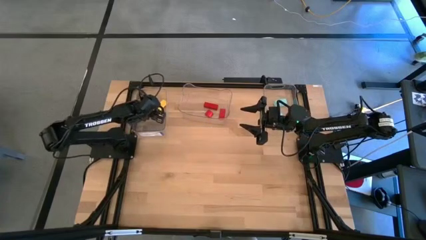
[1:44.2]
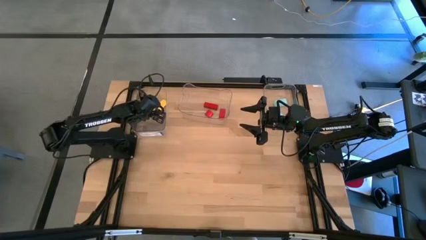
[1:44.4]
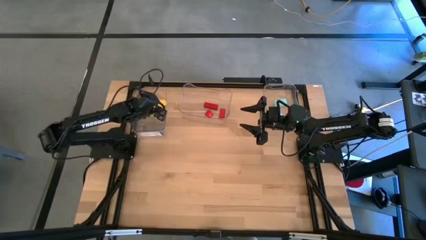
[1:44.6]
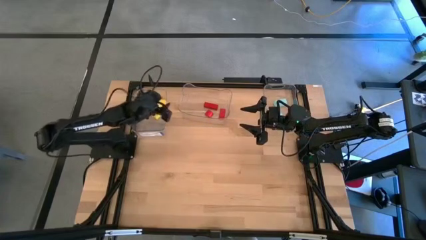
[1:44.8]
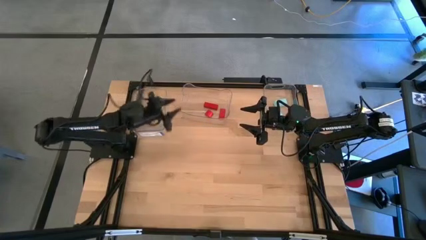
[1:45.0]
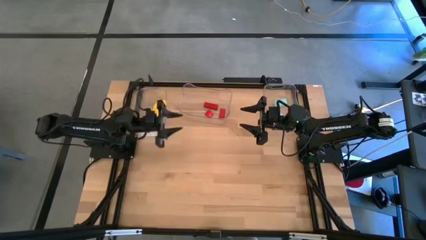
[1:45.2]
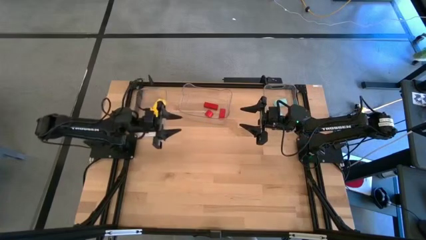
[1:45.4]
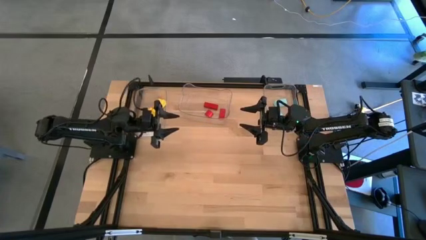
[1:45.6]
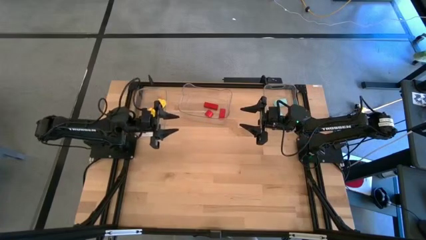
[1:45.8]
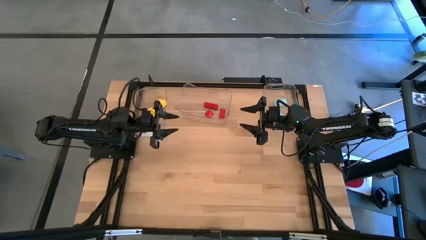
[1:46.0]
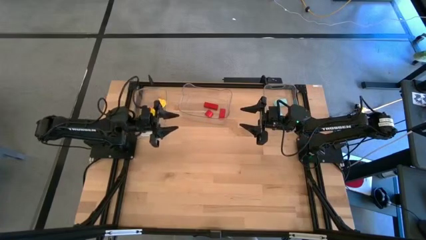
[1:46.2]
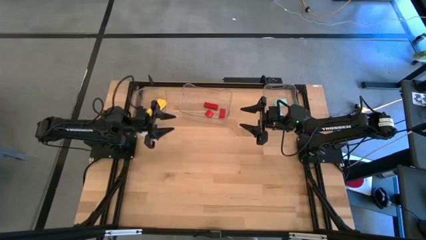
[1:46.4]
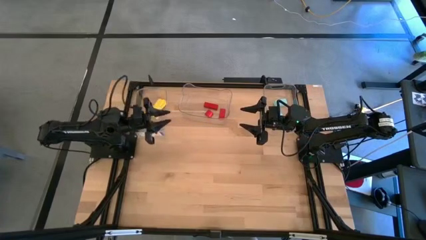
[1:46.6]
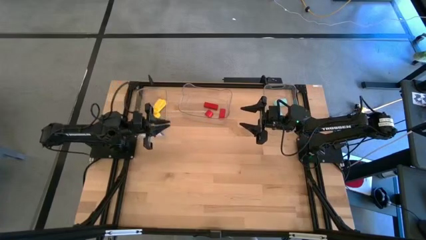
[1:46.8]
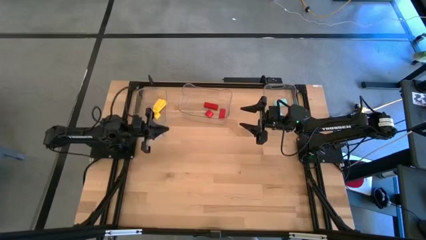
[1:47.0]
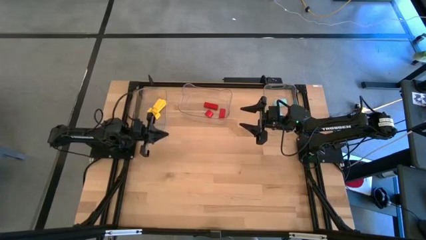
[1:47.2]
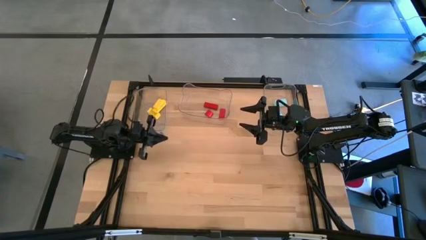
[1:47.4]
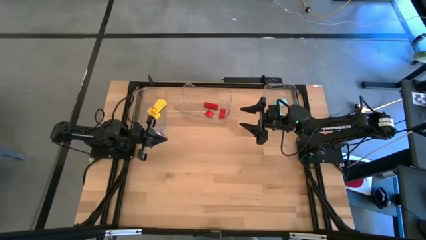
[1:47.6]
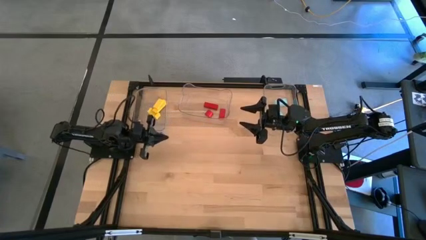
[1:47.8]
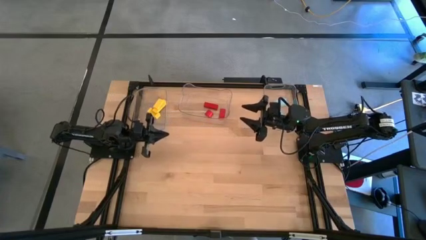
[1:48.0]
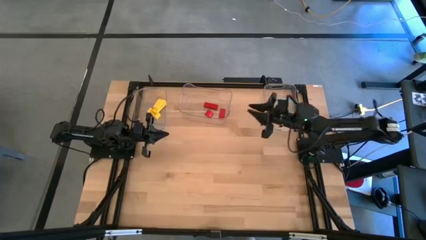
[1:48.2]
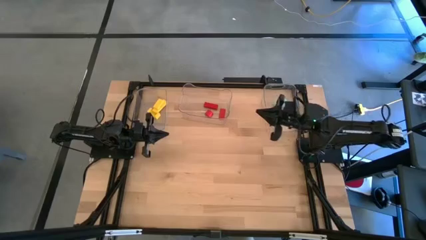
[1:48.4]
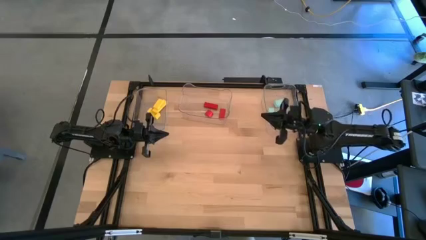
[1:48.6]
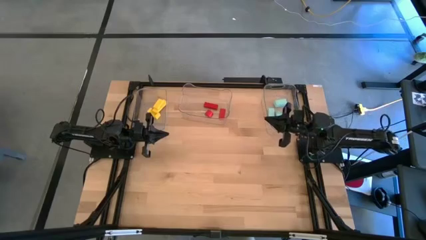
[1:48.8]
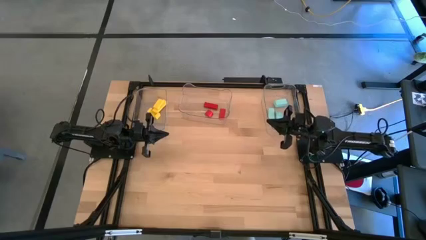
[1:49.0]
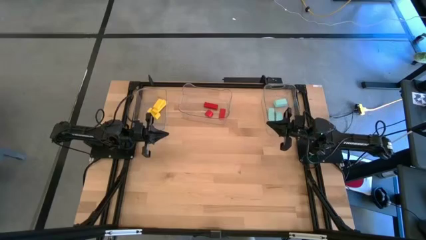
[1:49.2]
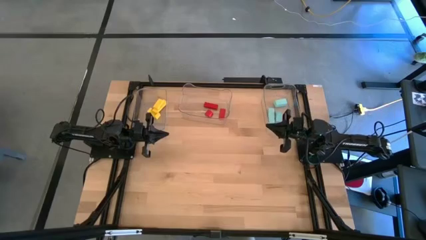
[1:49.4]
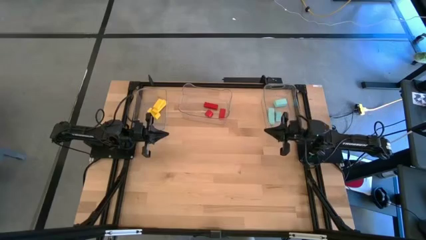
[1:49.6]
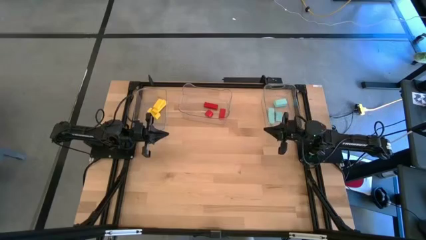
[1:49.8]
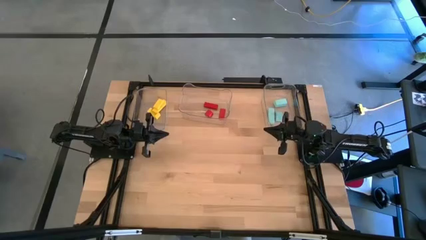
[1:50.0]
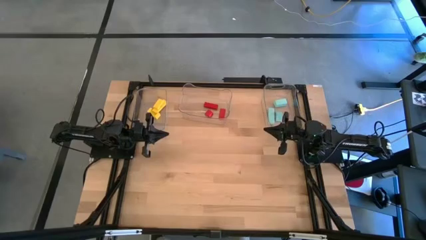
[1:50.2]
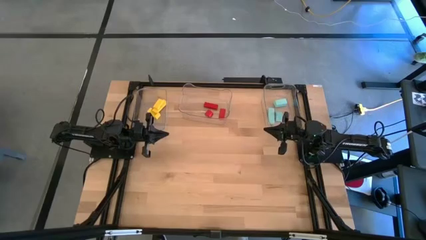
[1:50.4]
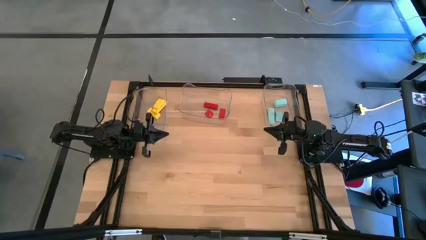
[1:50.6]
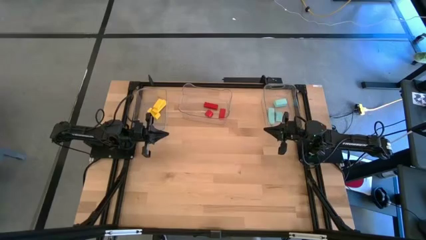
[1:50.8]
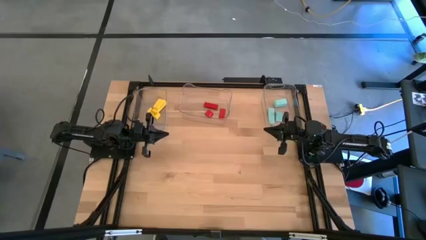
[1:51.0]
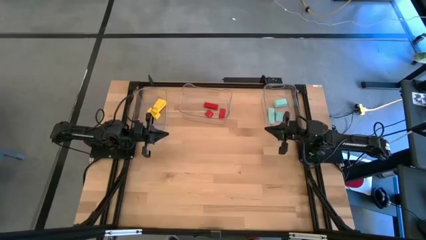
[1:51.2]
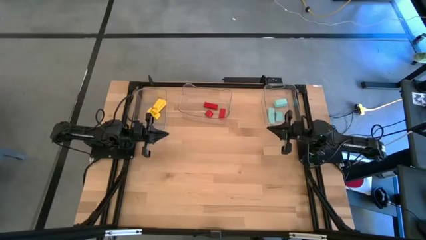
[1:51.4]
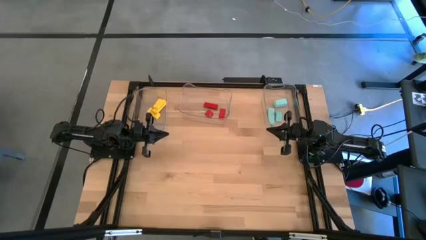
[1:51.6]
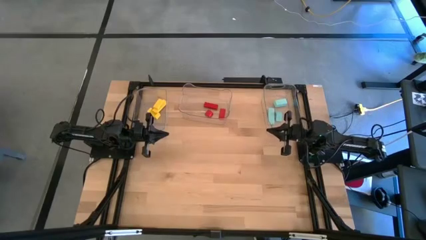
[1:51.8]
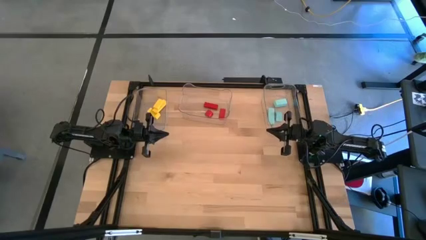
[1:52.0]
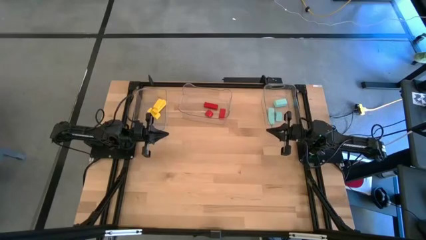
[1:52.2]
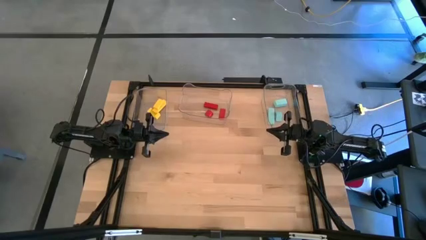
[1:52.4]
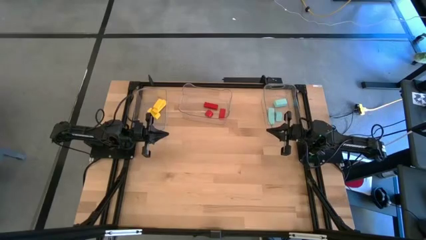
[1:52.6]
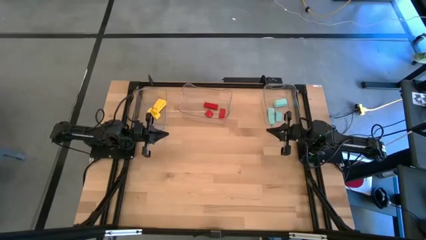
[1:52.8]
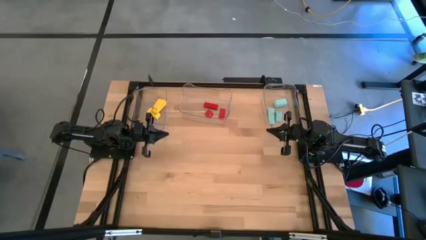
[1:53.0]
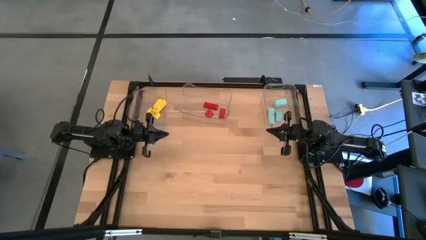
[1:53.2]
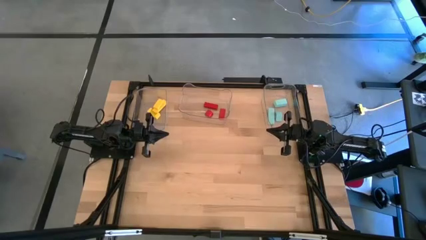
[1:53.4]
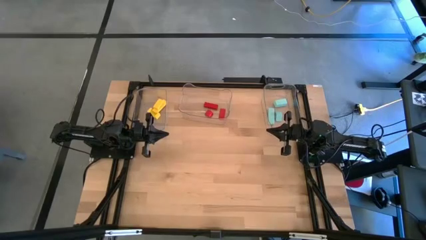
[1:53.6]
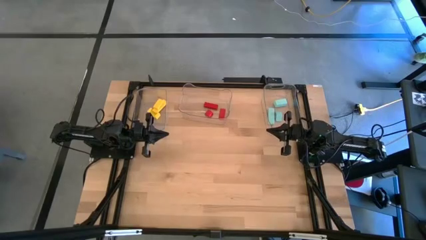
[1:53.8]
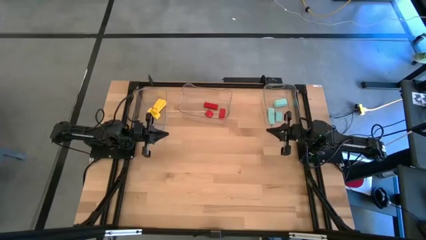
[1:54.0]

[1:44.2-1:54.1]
Task: Sort & place blocks by color
Return to Home Position

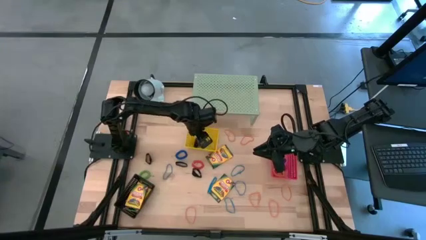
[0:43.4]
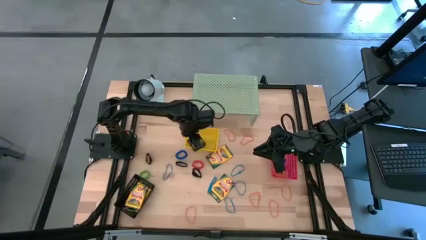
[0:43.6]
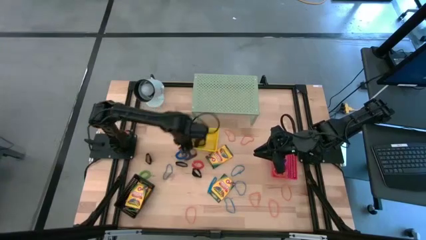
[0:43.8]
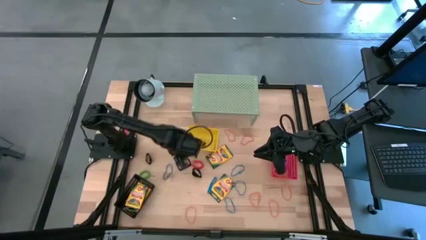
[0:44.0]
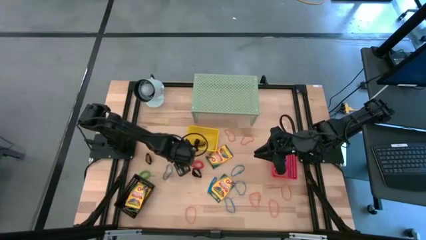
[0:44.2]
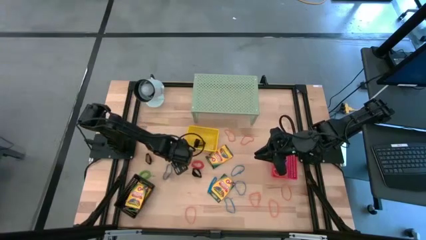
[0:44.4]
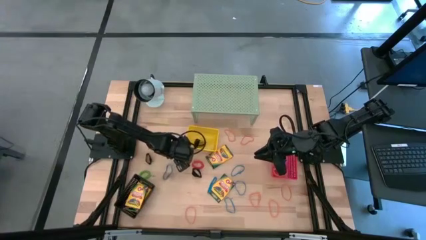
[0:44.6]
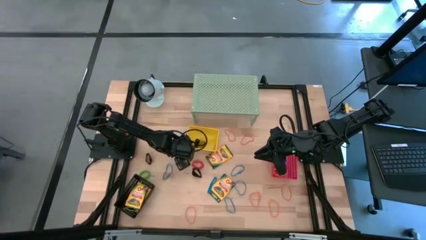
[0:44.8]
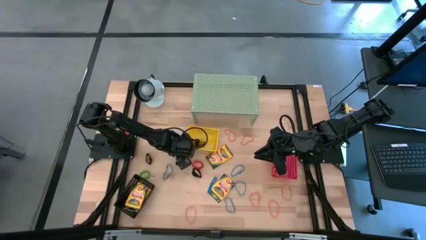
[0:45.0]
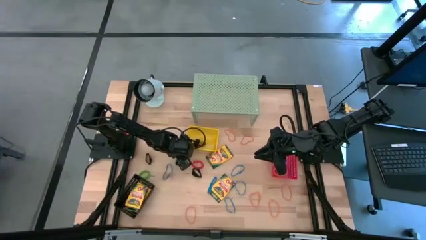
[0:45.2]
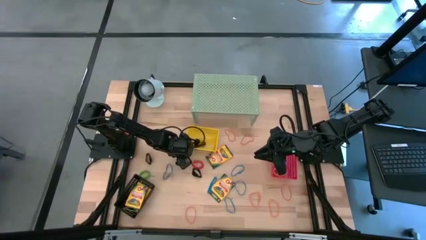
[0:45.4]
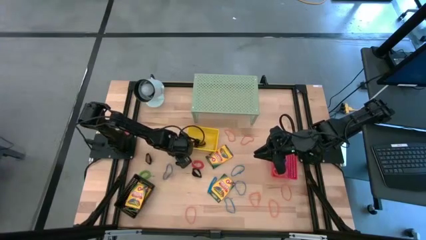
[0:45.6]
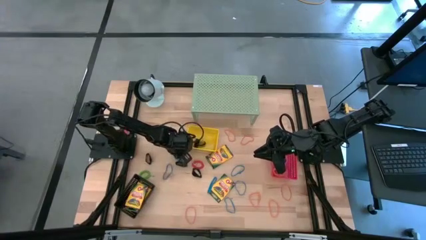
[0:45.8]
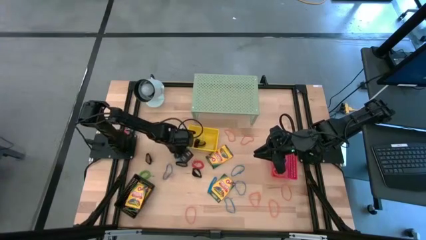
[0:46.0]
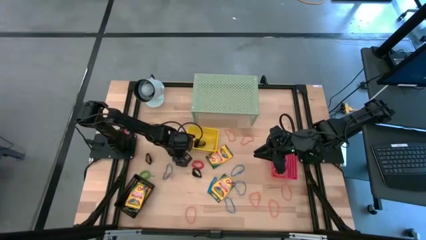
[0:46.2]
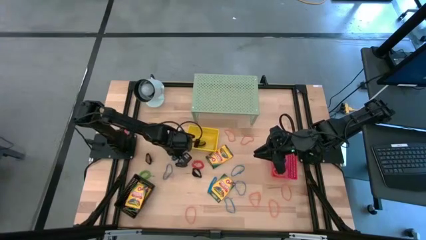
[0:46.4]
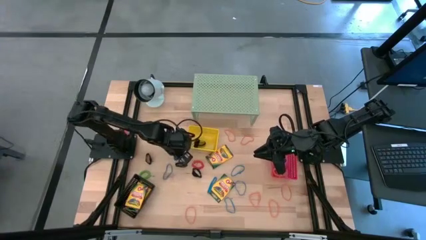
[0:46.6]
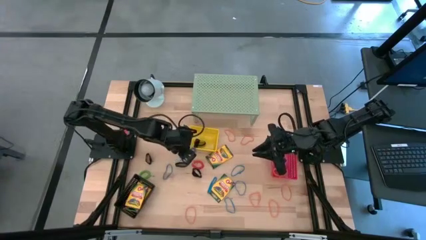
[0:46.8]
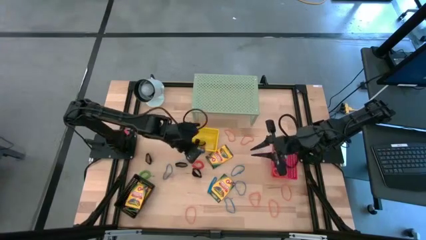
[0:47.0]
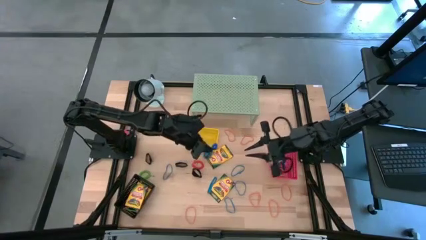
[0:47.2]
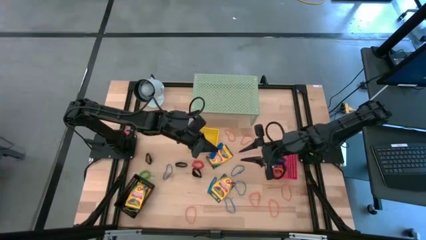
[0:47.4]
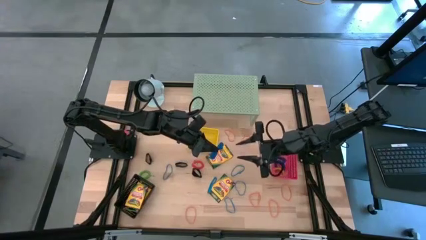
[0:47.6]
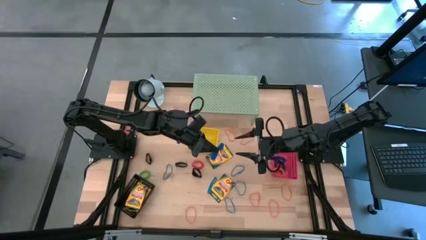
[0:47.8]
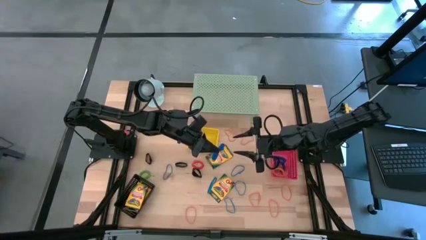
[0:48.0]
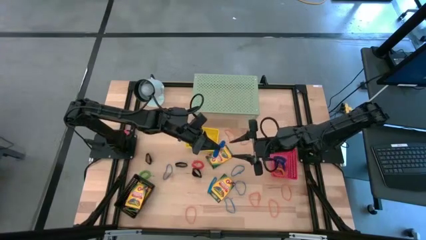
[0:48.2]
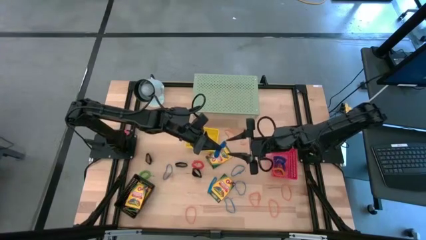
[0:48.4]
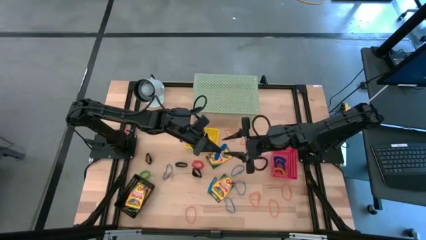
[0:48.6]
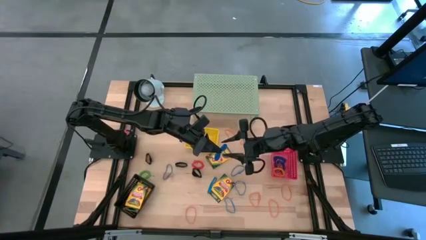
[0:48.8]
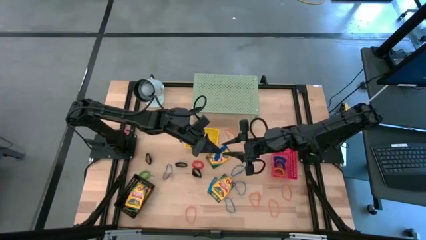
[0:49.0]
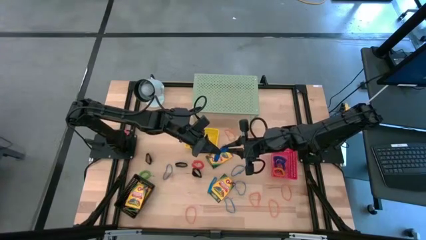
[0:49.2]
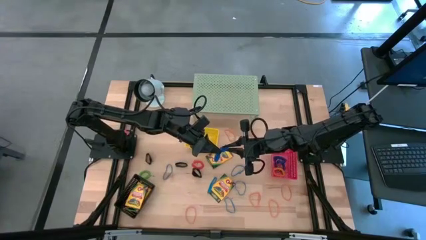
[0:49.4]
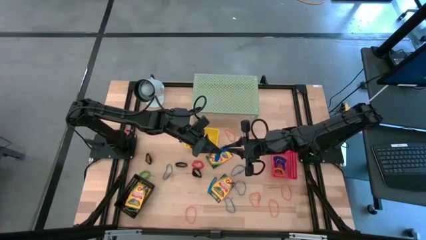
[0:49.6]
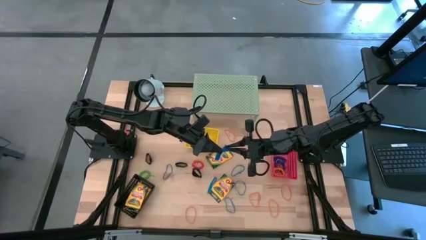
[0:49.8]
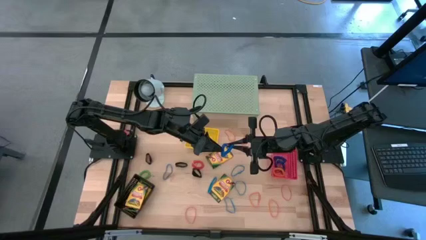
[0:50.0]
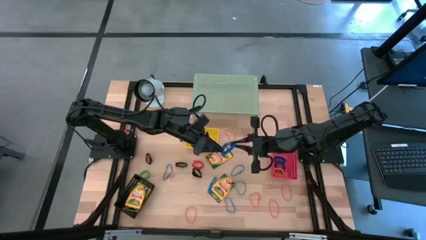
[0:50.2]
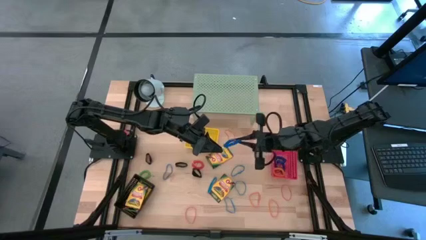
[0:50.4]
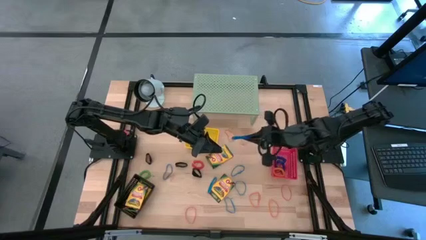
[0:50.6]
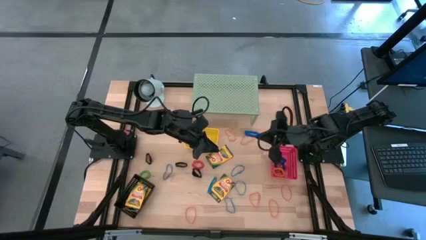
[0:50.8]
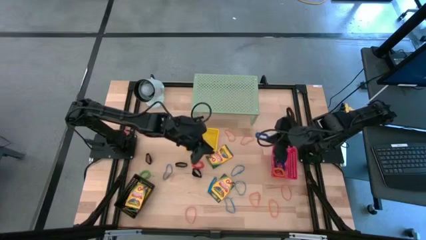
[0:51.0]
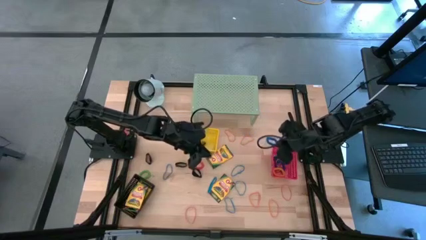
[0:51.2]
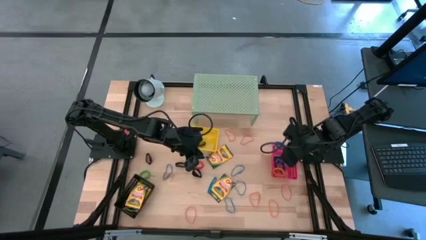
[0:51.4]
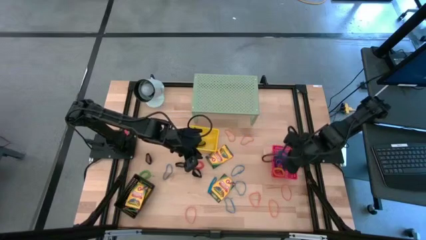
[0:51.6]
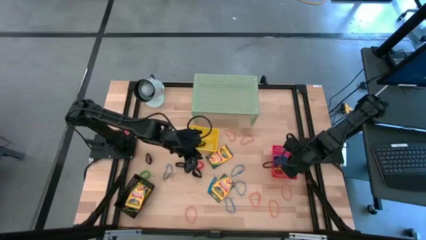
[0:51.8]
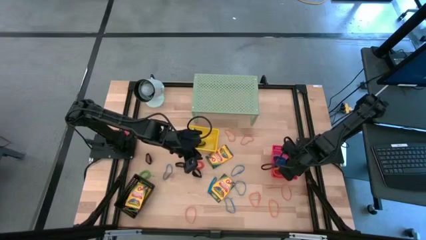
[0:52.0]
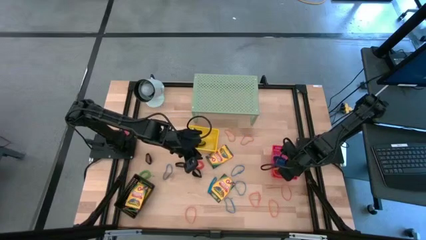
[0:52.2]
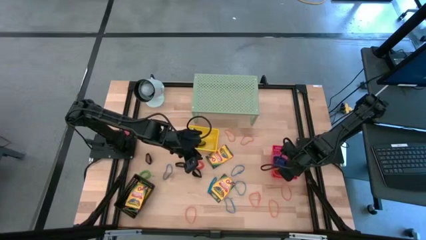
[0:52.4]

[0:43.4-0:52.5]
Task: Pick & Place Office Desk Supplies
Put the blue spring keychain into the red bin
